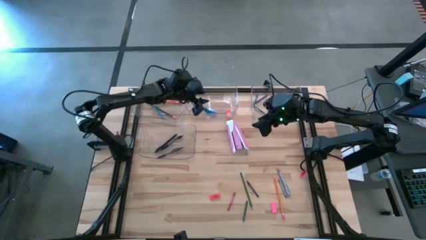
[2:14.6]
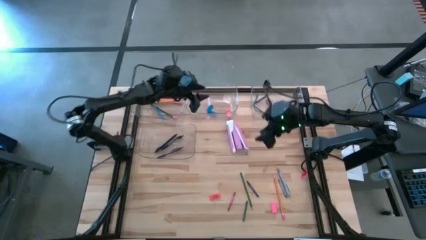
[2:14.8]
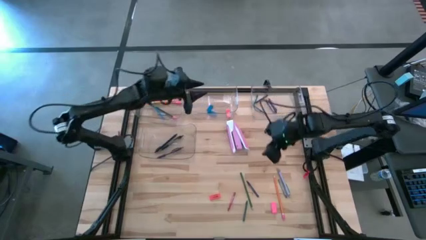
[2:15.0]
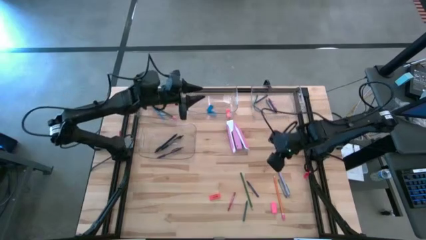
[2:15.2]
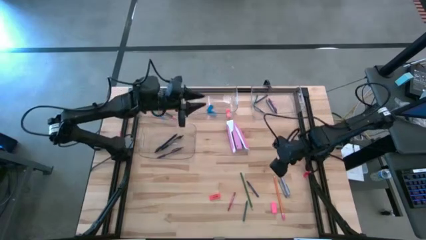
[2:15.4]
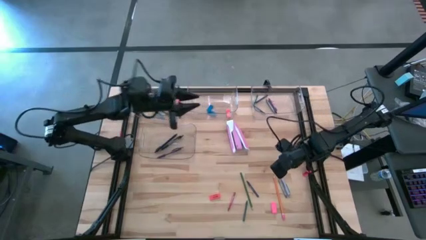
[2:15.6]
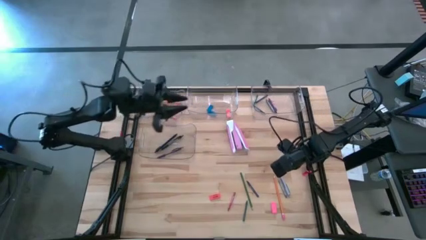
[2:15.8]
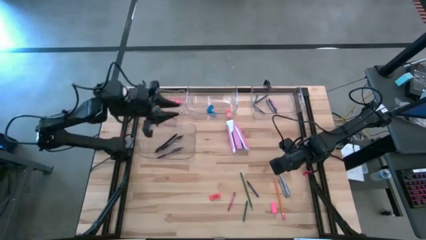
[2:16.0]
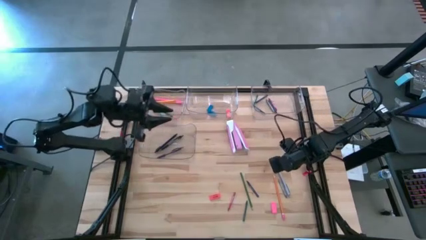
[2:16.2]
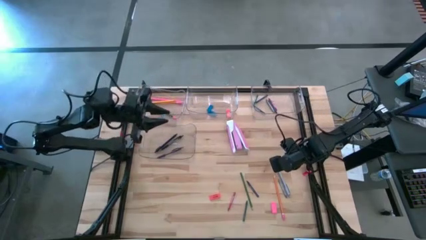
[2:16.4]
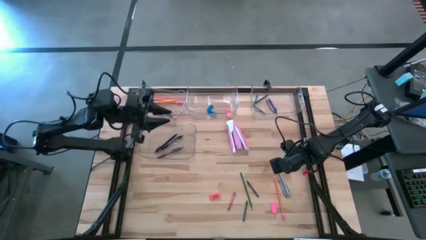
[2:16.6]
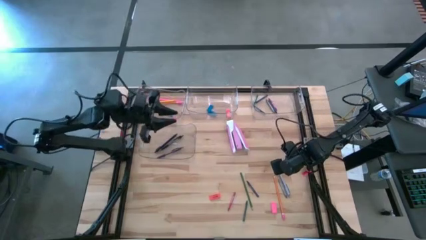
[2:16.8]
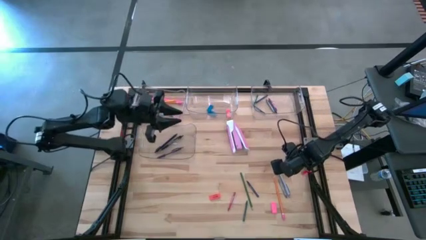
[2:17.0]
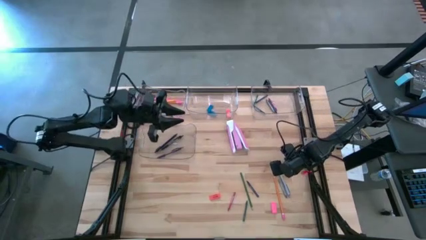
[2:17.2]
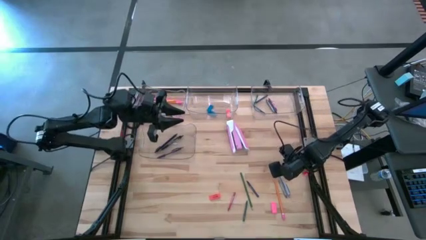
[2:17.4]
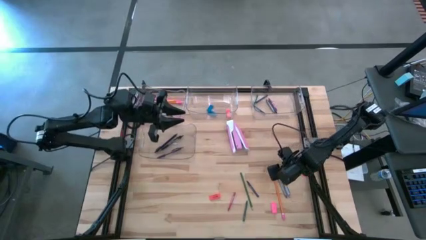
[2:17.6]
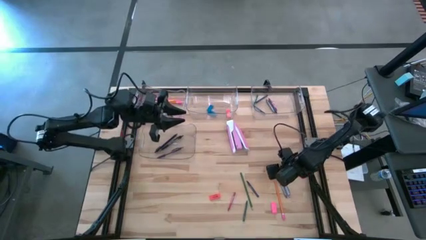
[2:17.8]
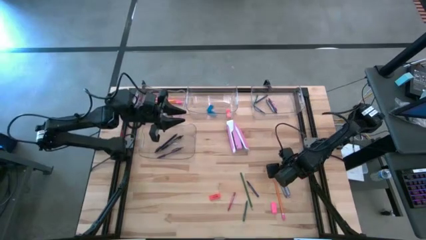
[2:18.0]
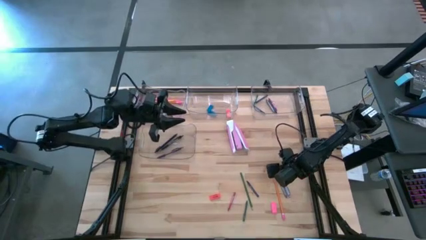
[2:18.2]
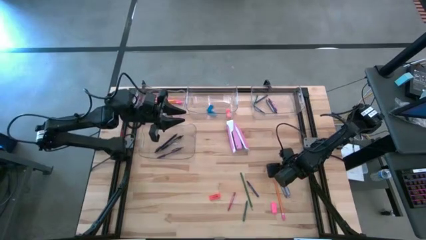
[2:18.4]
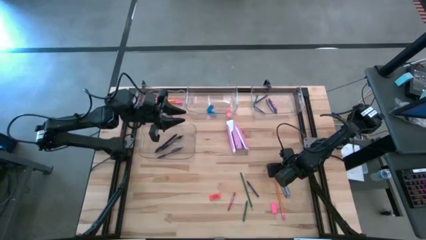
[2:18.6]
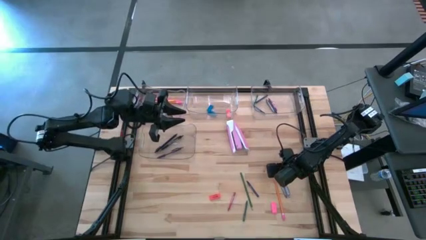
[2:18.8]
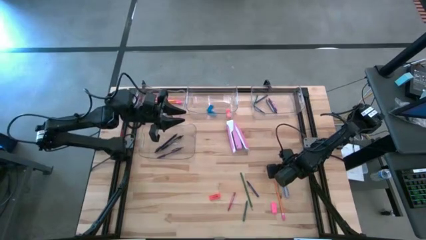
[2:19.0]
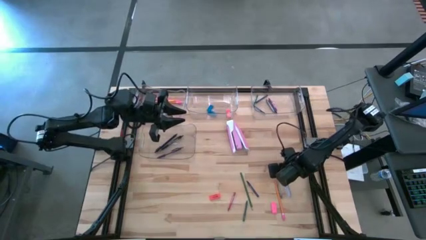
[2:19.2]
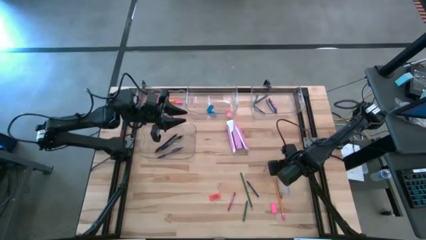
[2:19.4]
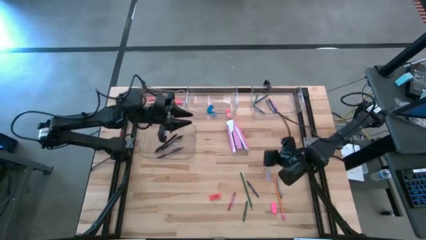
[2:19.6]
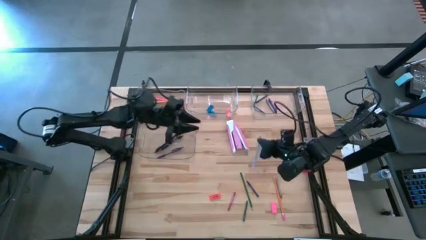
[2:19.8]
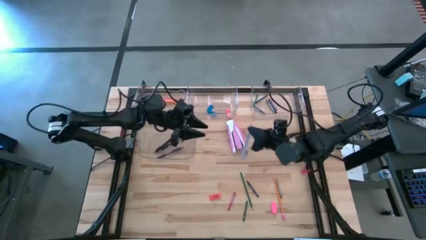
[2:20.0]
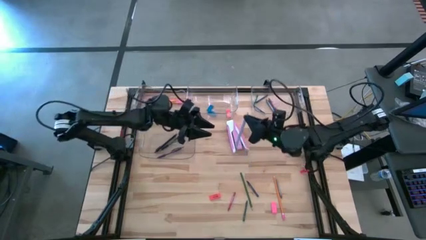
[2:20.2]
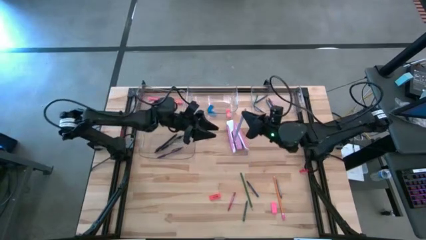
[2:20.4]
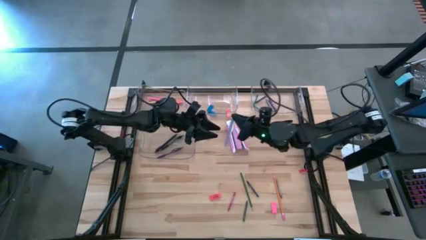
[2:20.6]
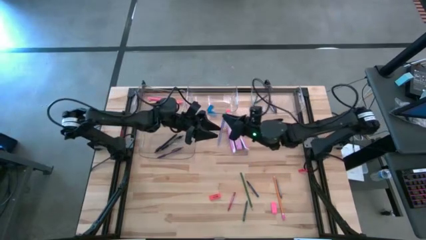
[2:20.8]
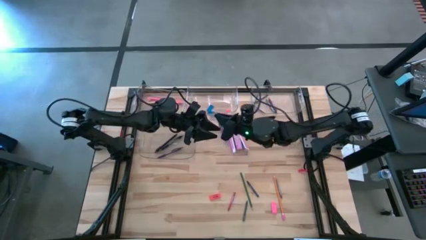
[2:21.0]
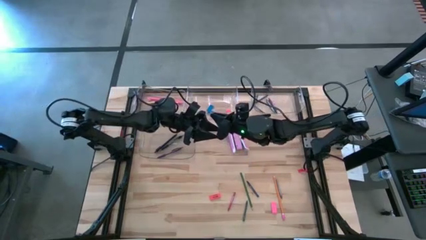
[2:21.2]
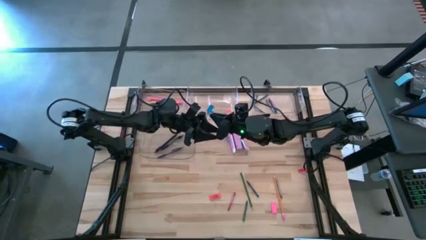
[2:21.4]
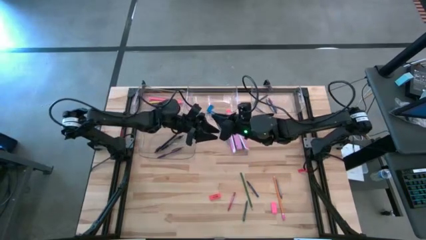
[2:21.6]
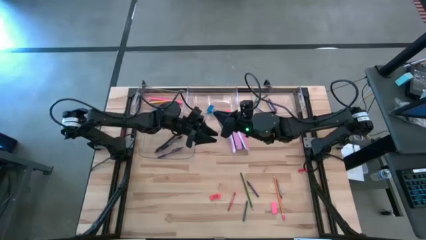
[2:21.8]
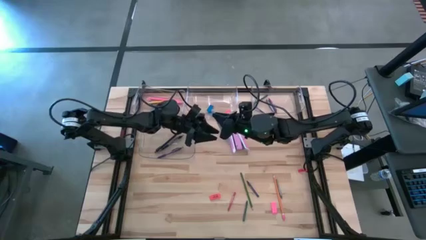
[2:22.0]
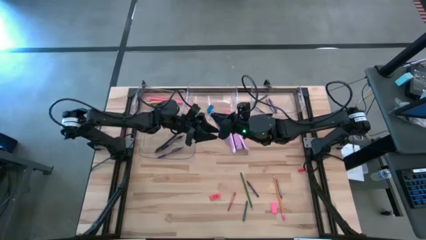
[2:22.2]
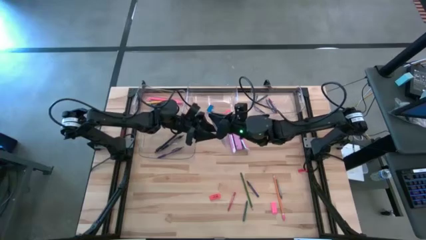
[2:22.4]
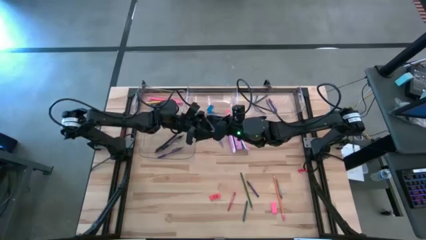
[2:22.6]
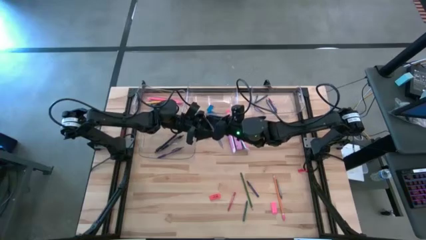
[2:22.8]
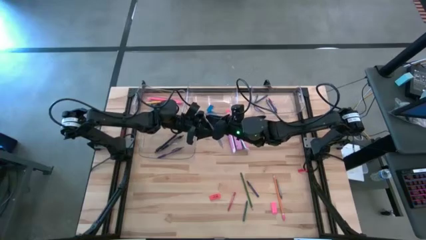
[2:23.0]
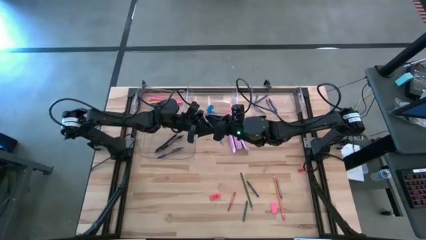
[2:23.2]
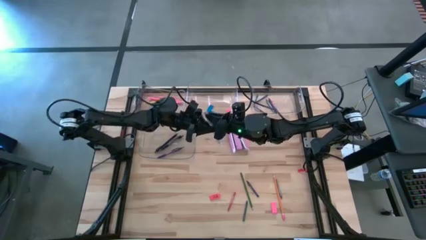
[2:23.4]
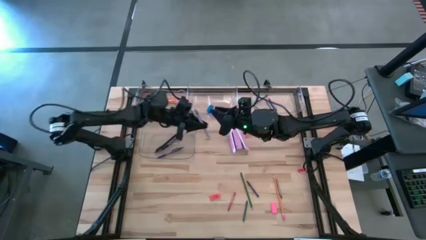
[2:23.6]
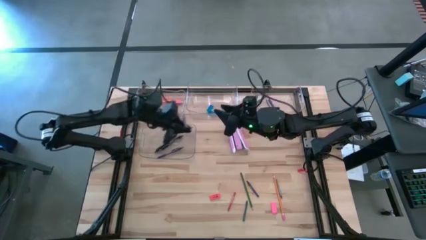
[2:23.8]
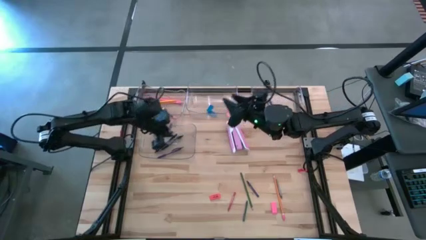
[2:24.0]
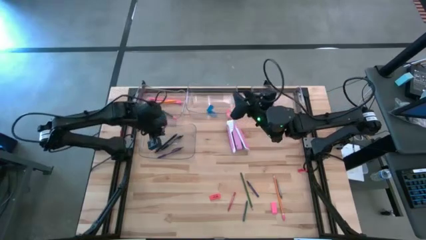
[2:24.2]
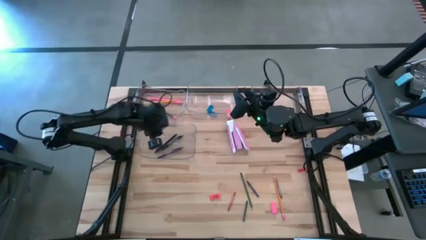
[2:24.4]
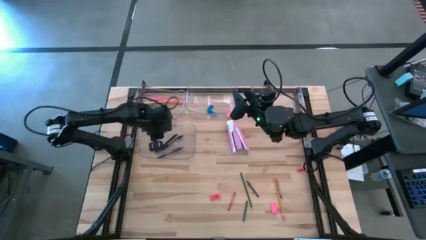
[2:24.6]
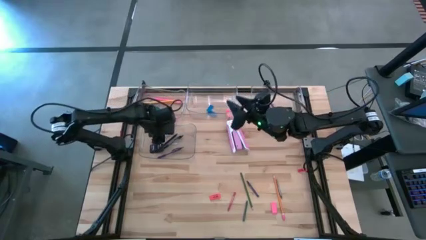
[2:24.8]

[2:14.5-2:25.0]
Task: Sort crayons/erasers/pens/pencils in bins
Put the gray pen into the bottom left transparent bin

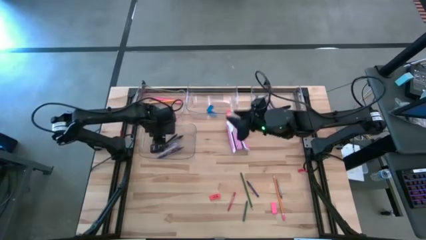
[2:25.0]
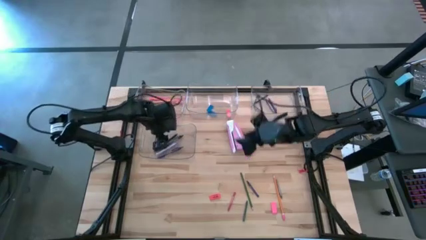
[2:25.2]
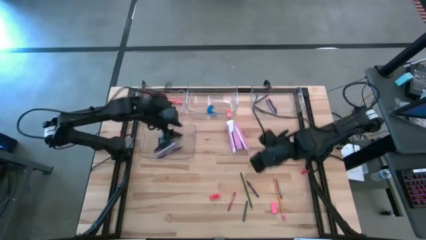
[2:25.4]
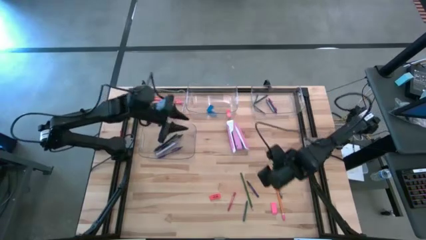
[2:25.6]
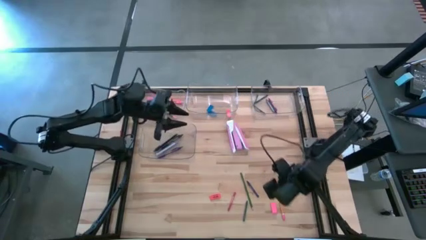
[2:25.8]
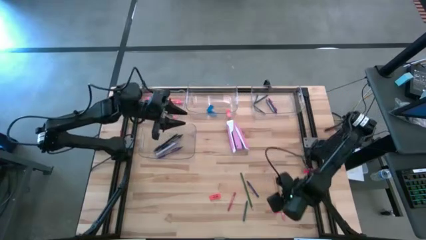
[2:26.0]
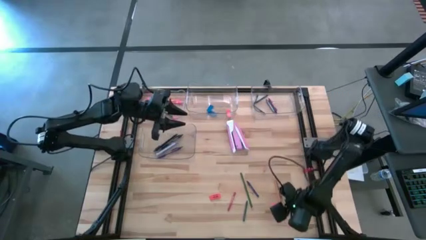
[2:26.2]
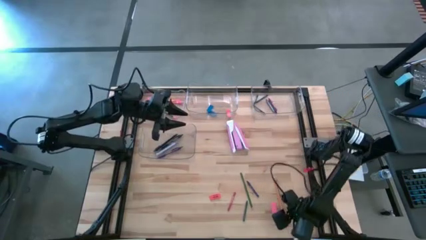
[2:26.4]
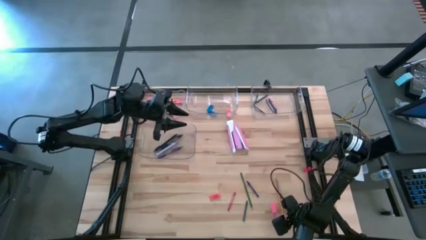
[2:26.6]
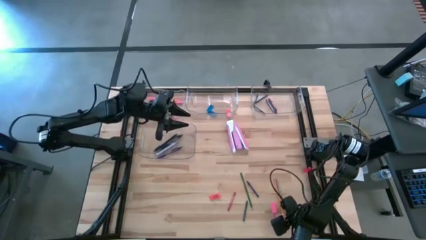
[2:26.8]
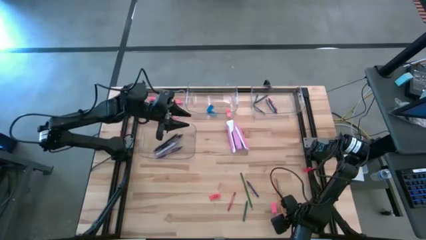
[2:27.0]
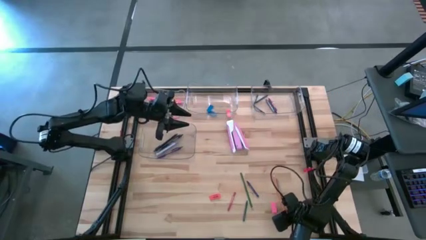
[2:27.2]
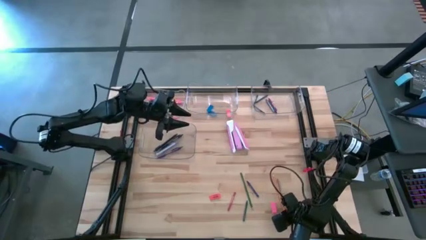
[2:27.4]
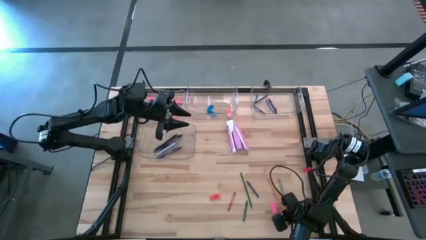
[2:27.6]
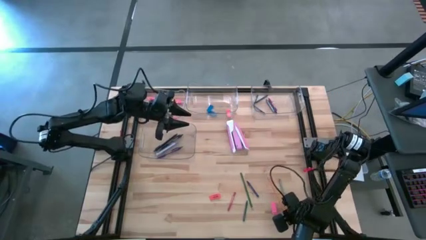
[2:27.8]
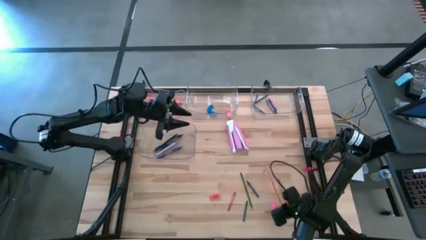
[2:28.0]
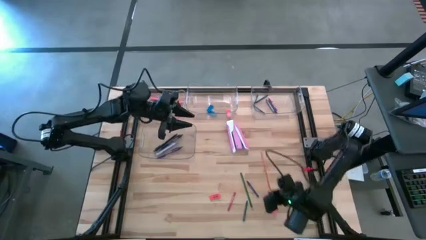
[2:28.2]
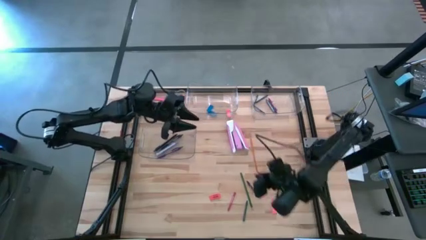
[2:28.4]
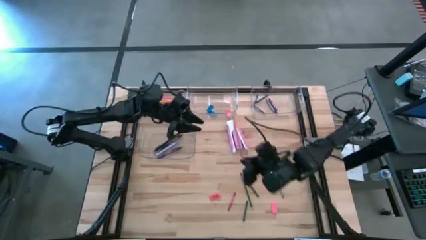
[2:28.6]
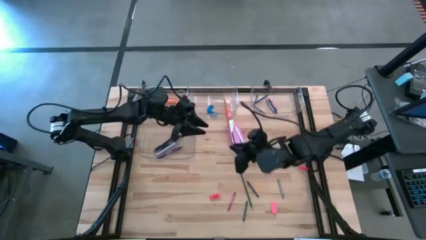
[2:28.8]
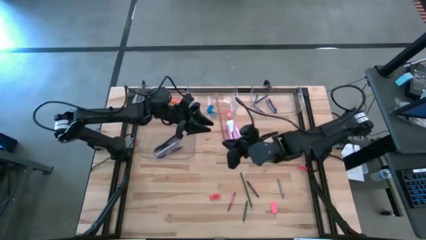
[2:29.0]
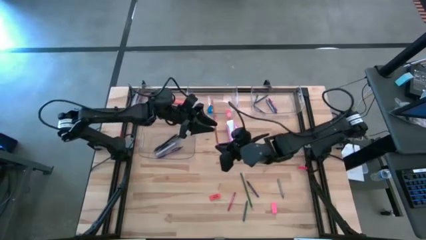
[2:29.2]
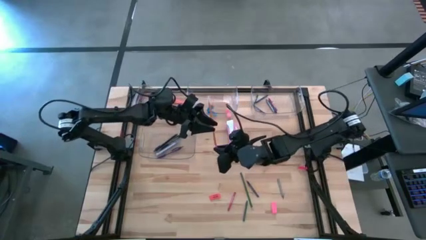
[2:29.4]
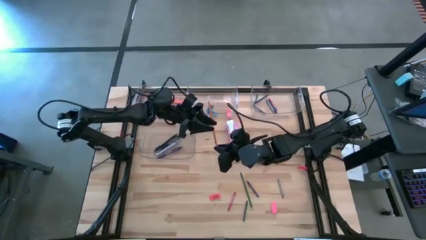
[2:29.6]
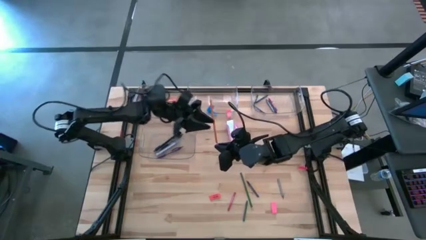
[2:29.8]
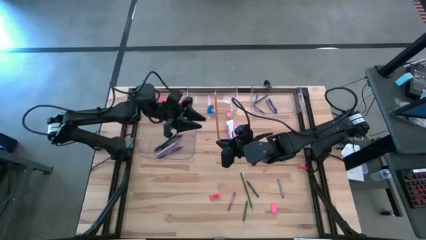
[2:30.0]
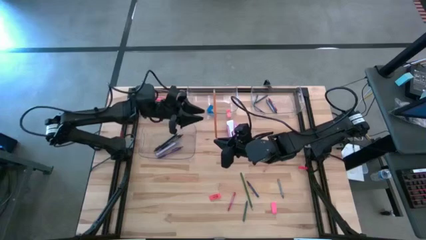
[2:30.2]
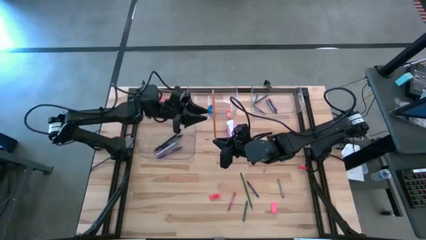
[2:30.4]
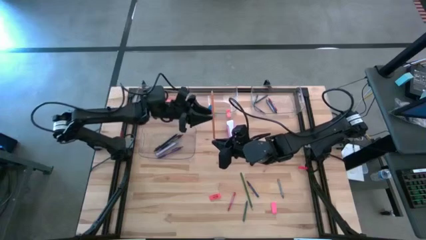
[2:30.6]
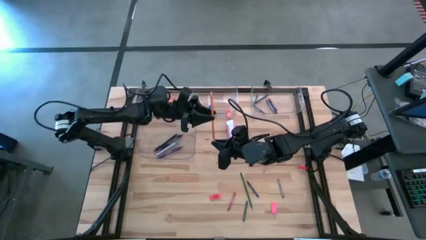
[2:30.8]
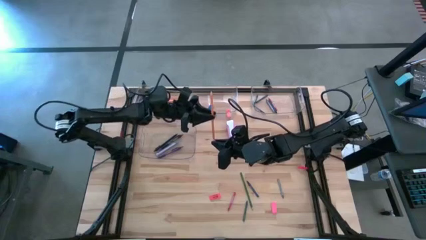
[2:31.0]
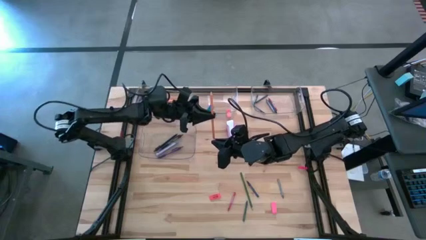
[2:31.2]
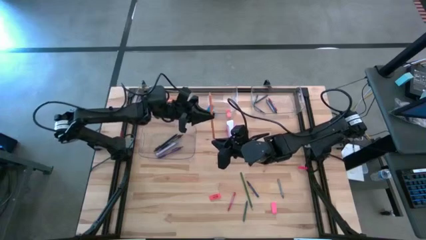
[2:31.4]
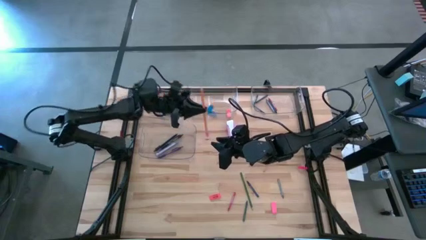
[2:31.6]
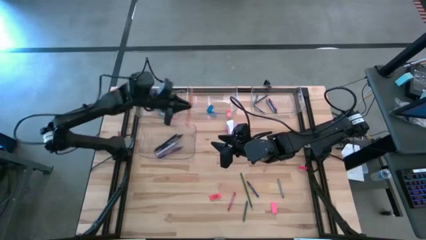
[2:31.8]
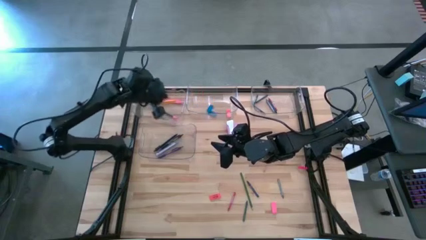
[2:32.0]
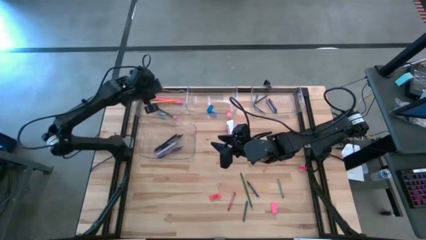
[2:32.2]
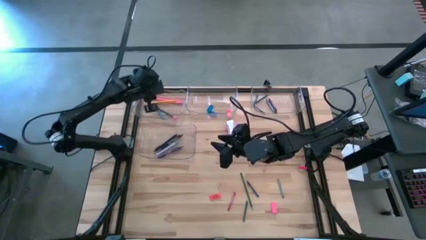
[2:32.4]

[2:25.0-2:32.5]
Put the orange pencil into the top left transparent bin
